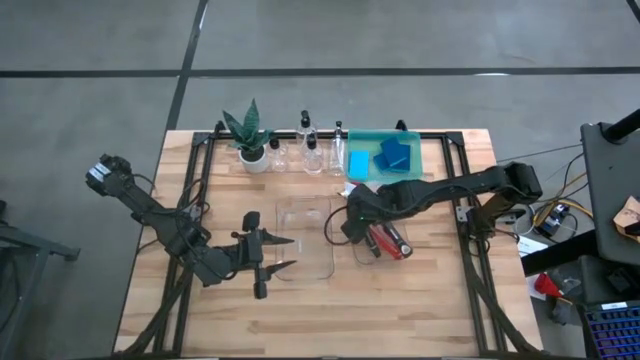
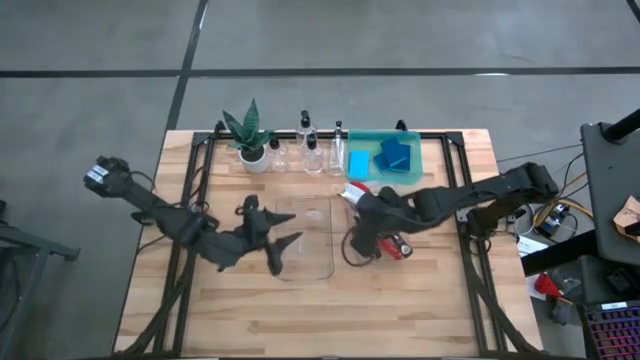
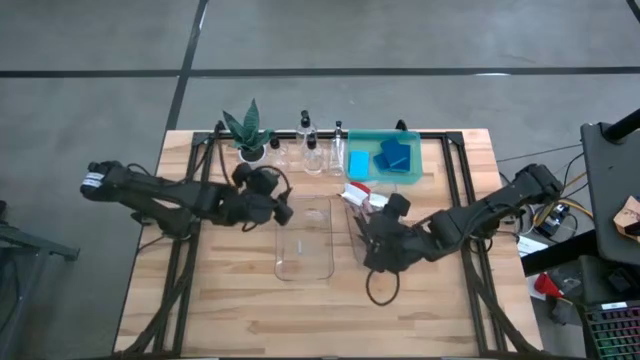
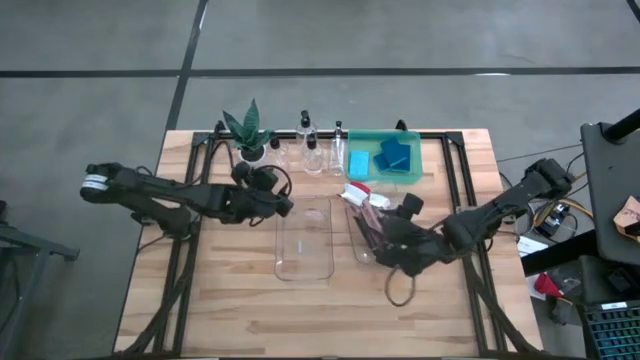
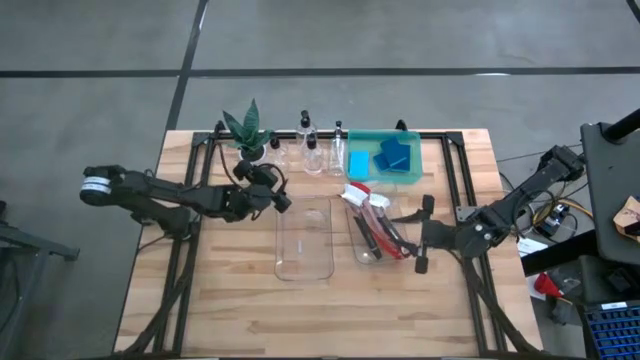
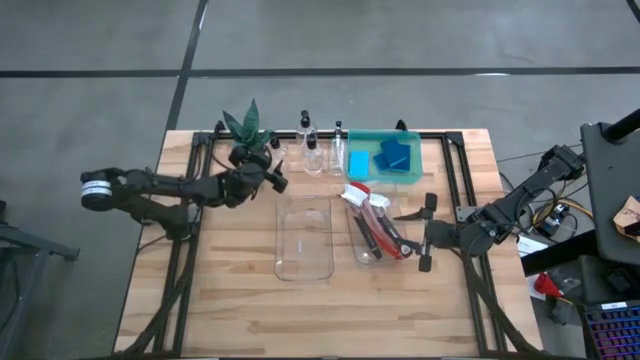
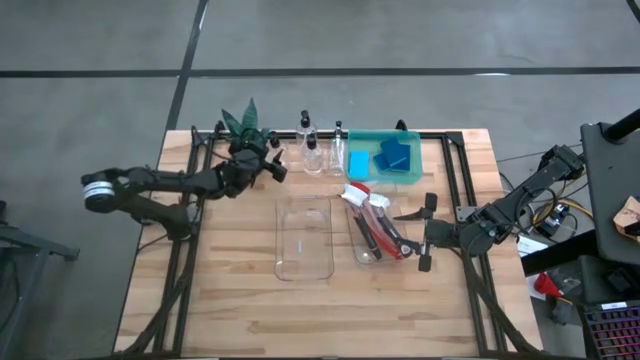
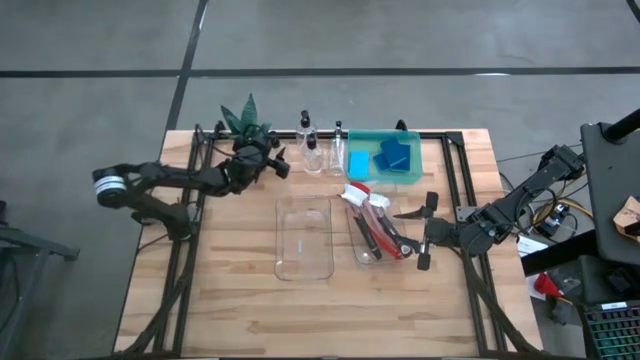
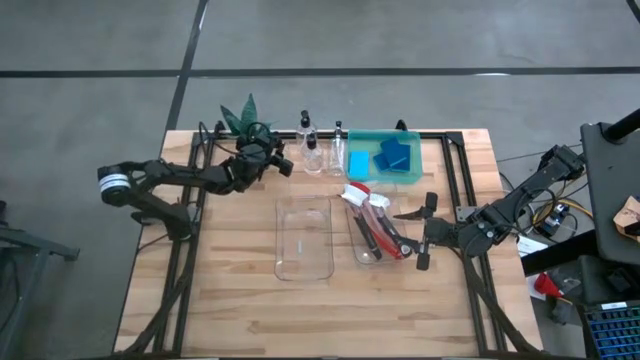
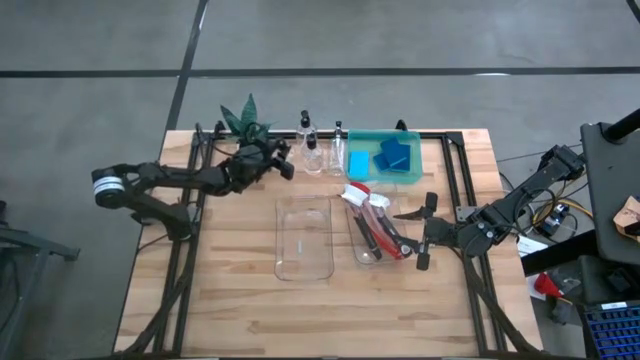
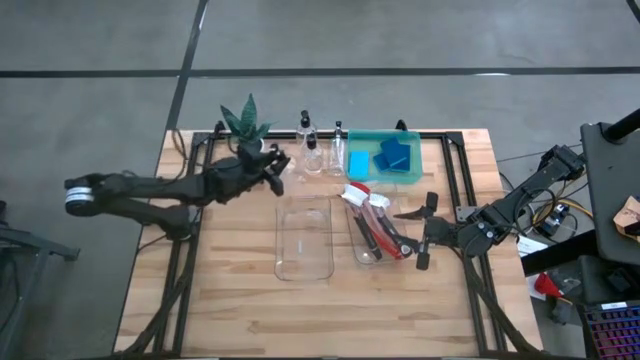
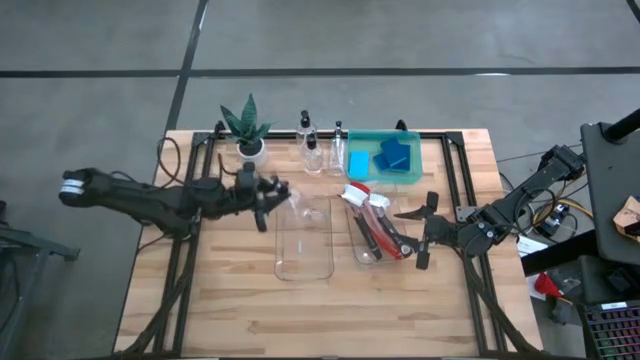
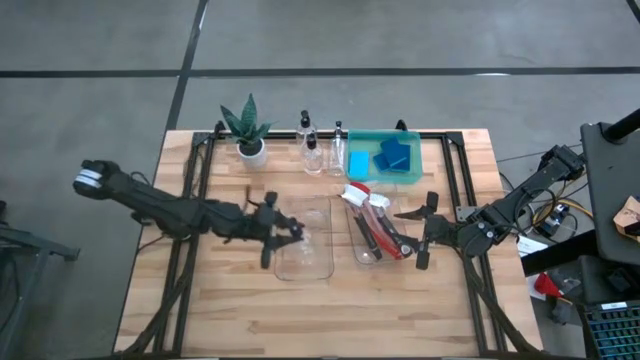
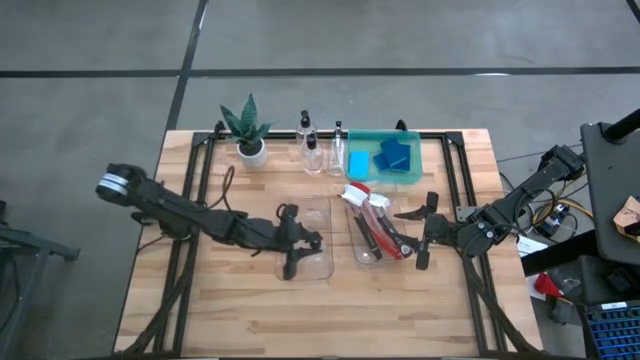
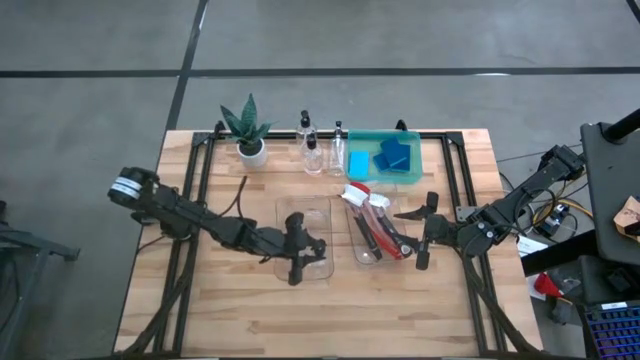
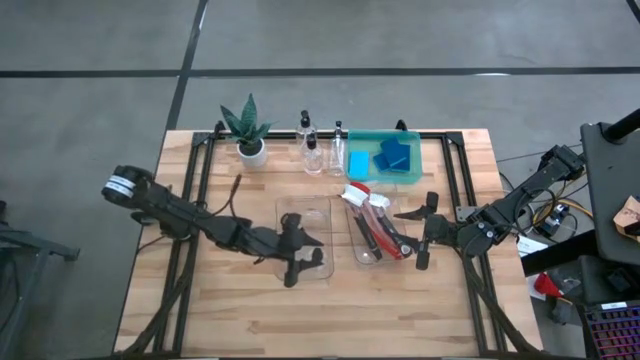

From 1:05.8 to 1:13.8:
Task: Pick & Place Kitchen Sink Supplies
Put the transparent soap dispenser into the left transparent bin

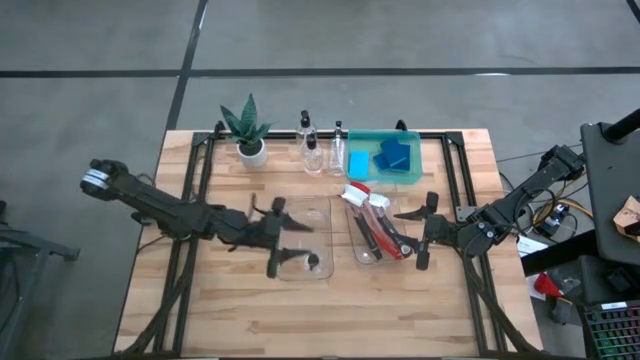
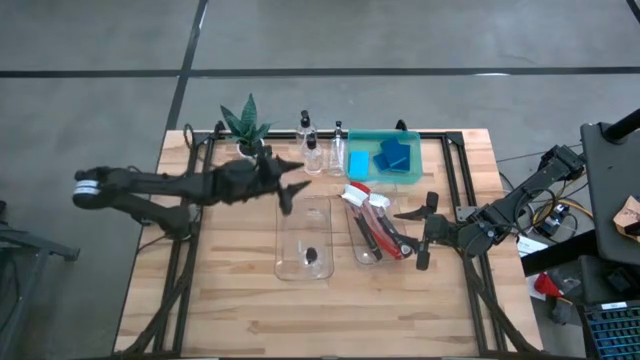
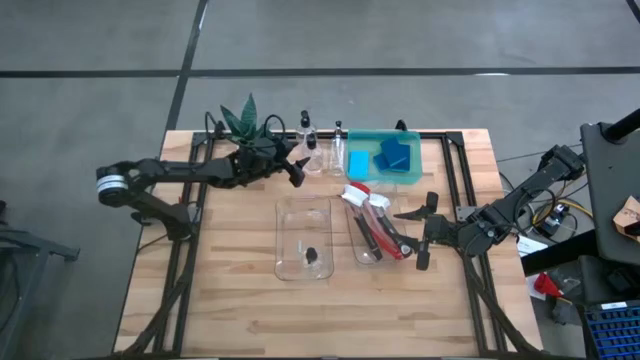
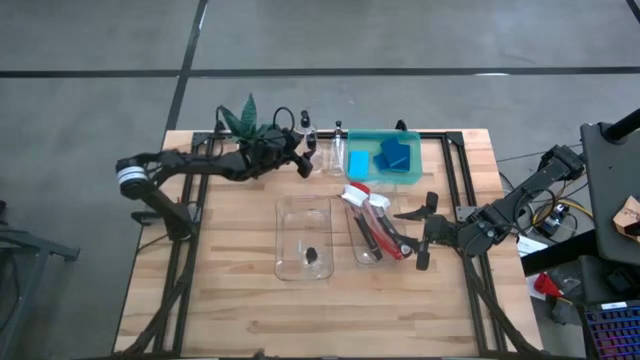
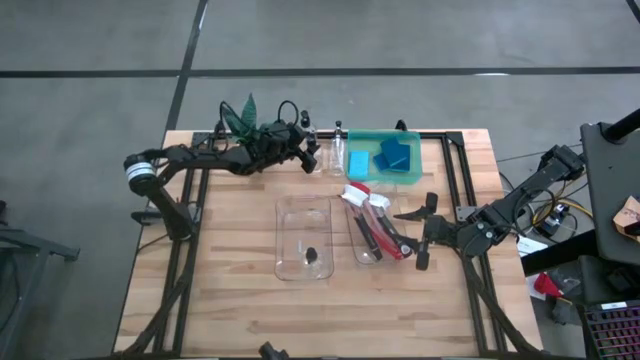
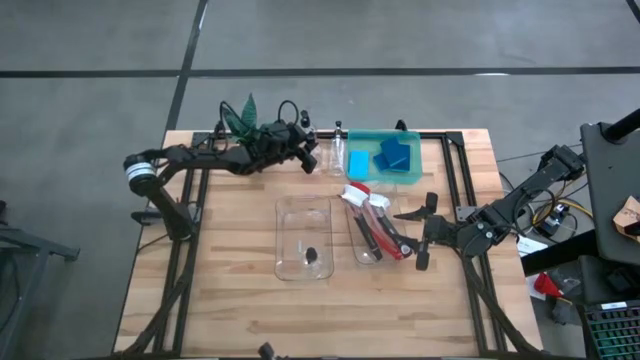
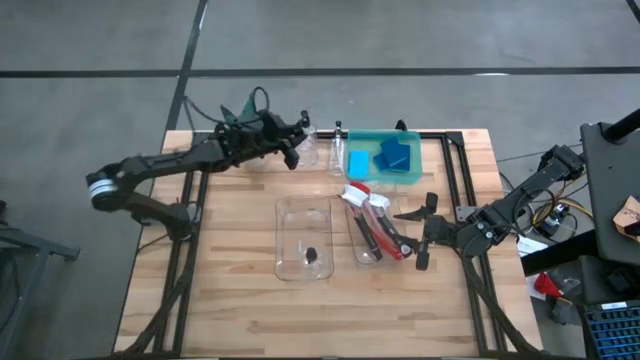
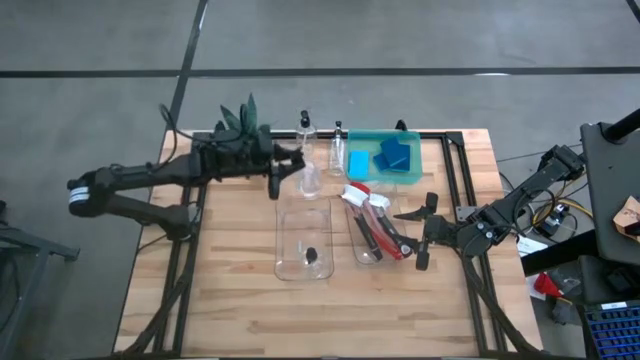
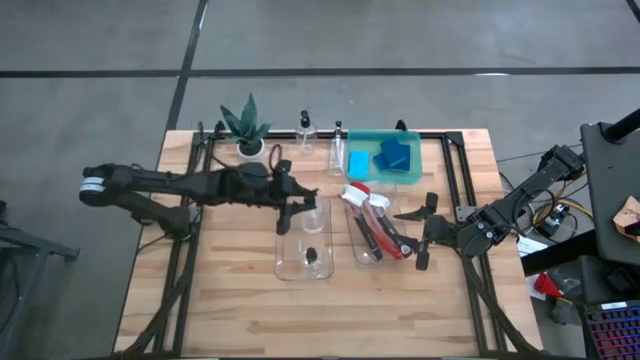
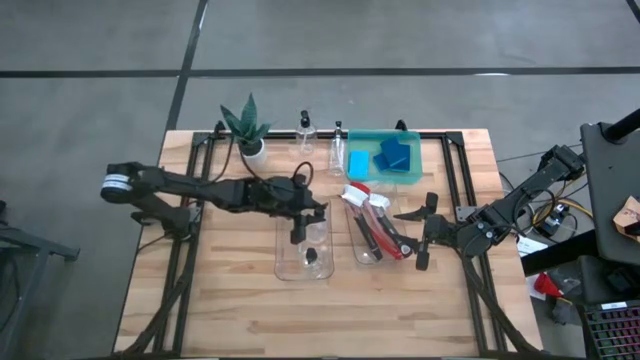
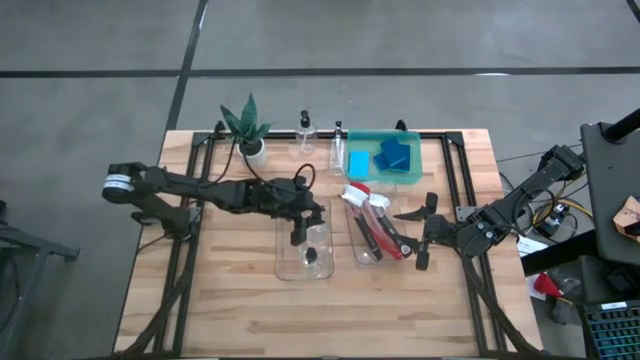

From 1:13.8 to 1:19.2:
Put the transparent soap dispenser into the left transparent bin

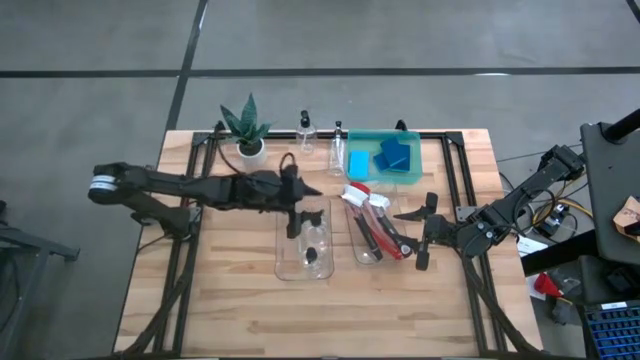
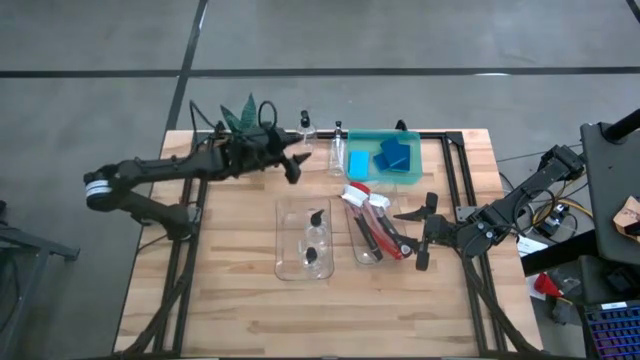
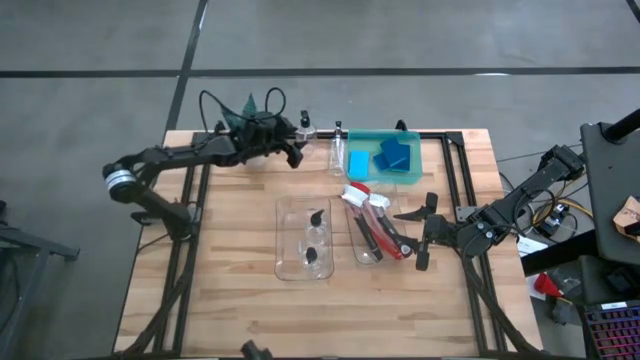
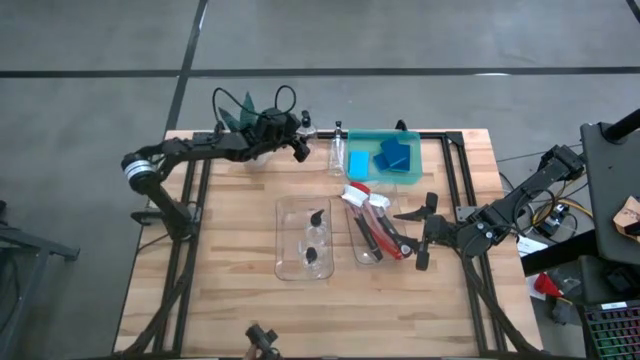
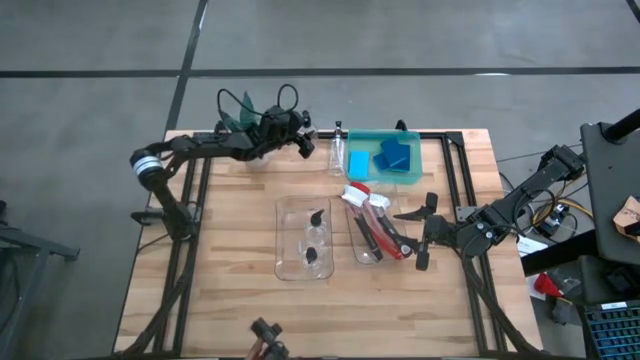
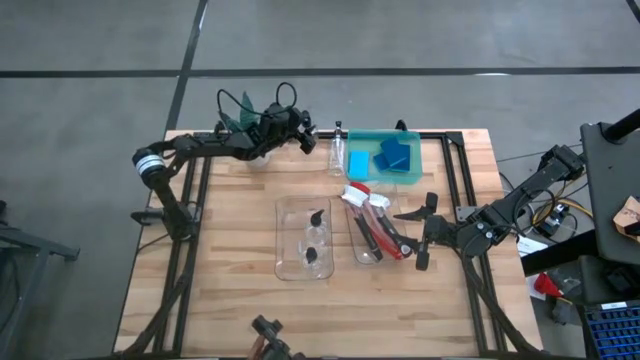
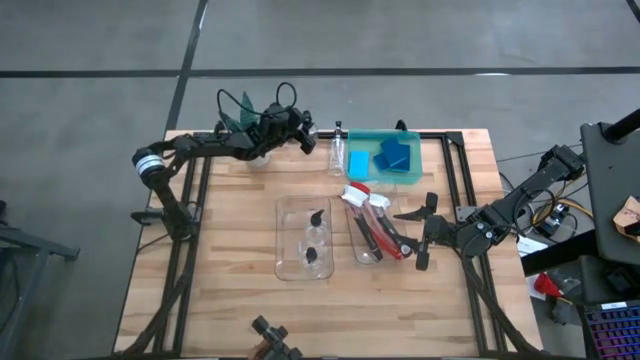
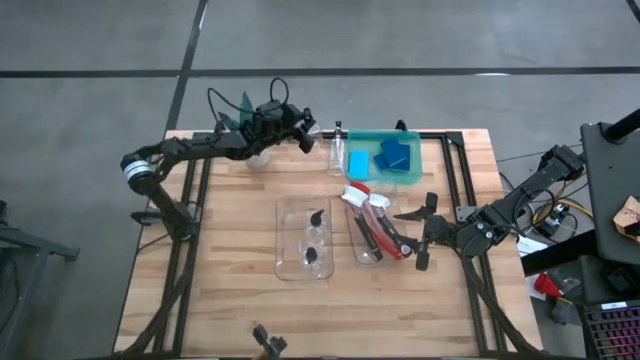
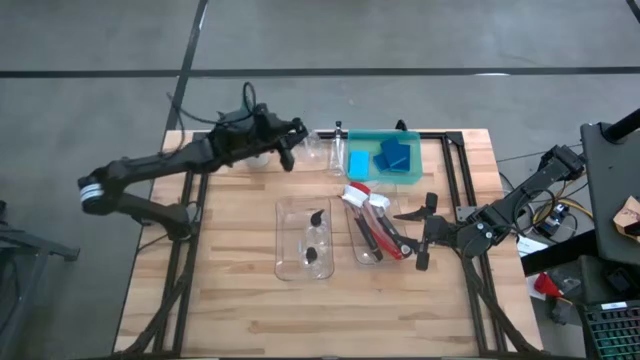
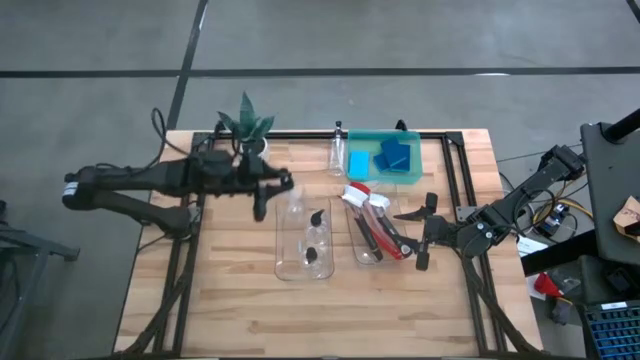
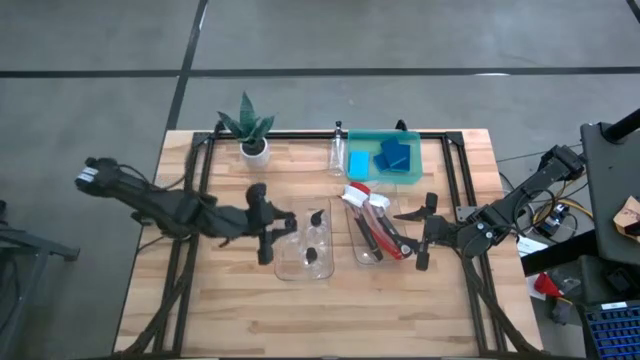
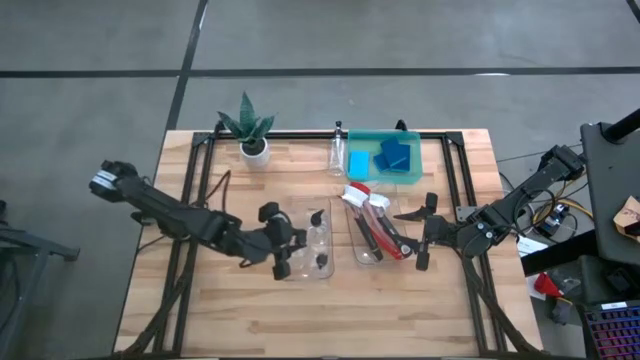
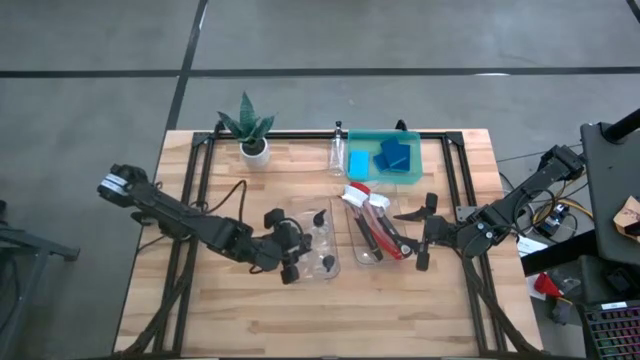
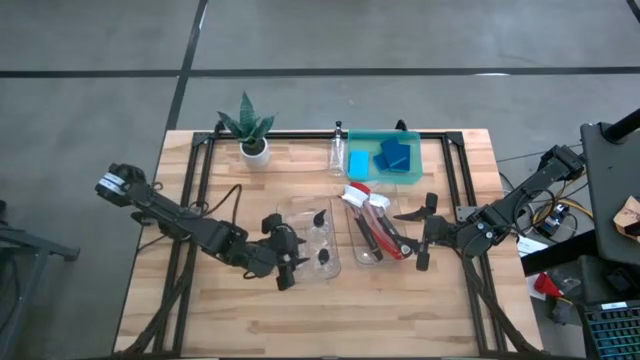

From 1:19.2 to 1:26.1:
Put the transparent soap dispenser into the left transparent bin

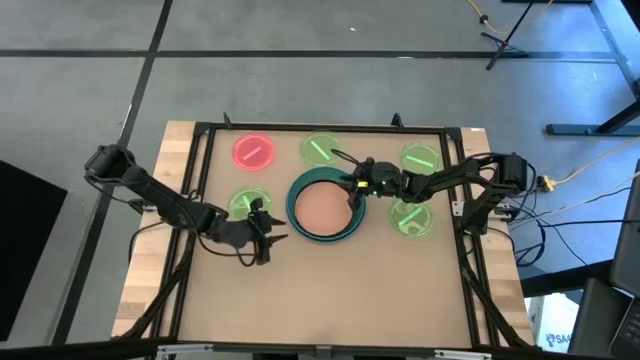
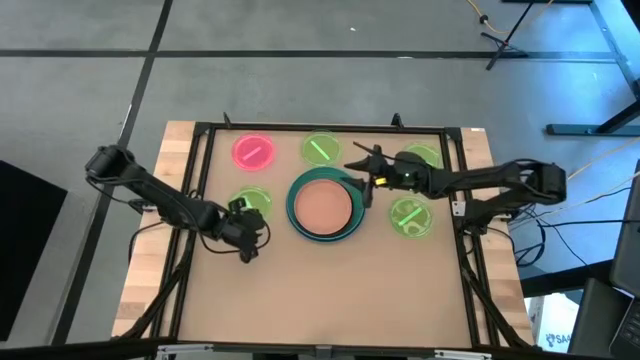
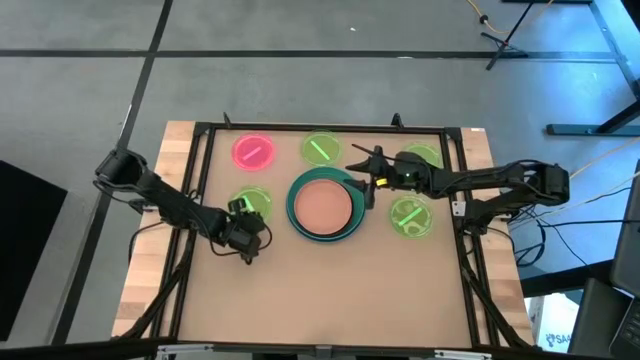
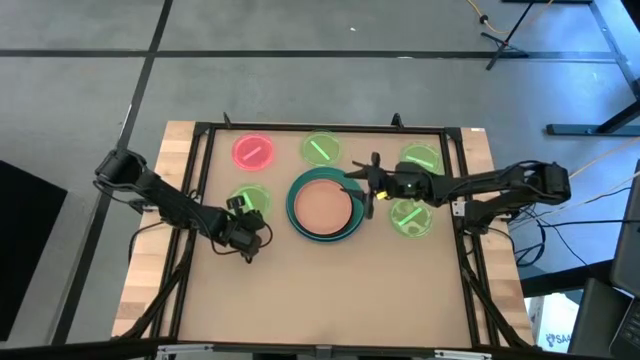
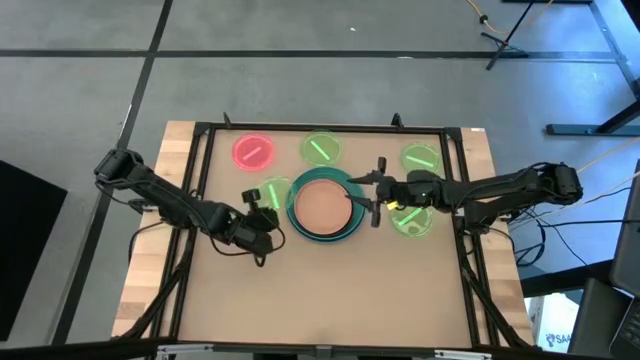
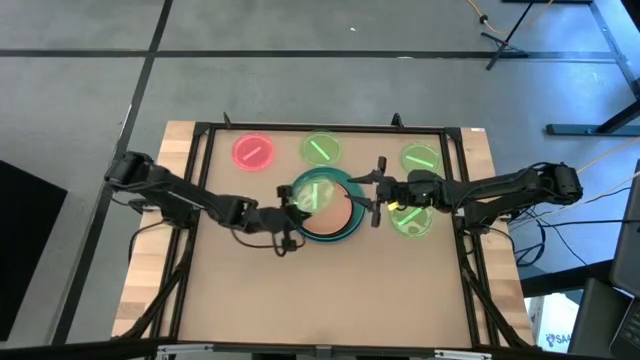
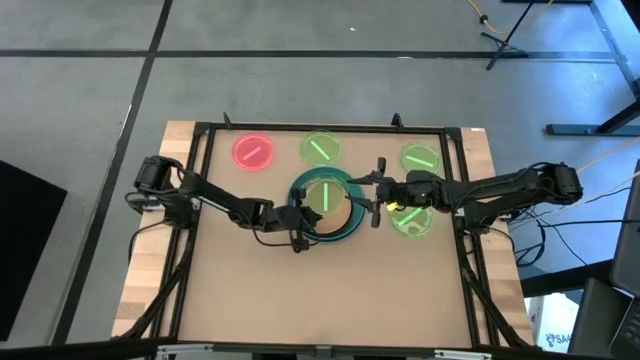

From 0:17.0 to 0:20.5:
Task: Stack plastic plates
Stack the light green plate on top of the orange plate
